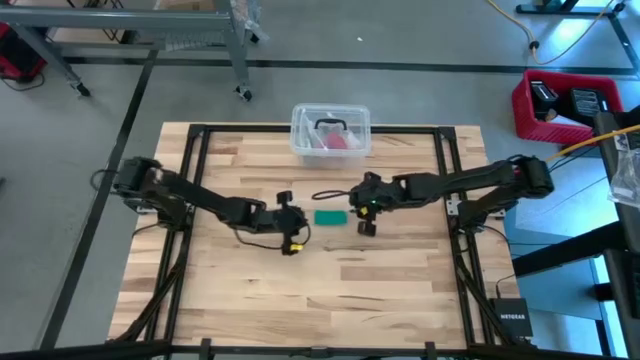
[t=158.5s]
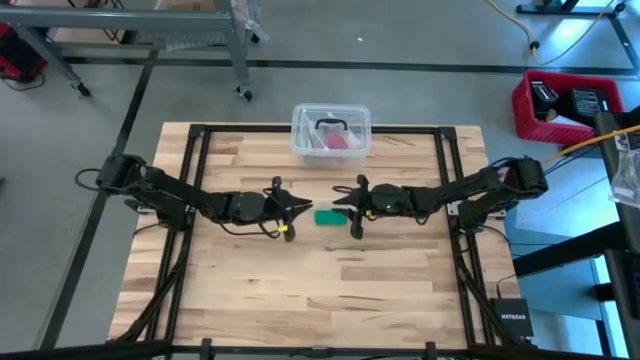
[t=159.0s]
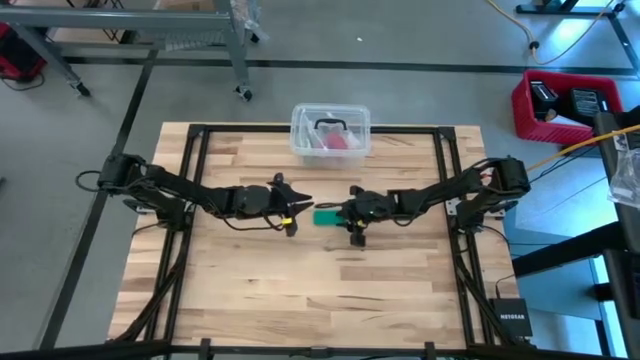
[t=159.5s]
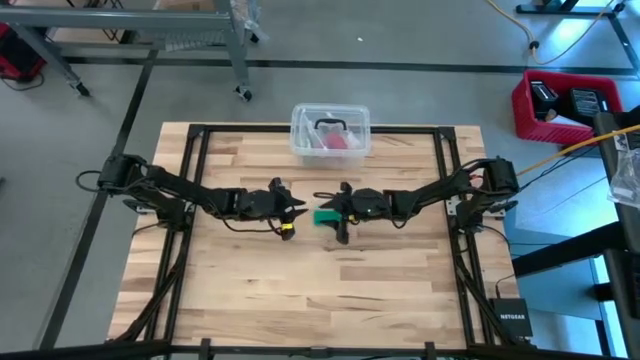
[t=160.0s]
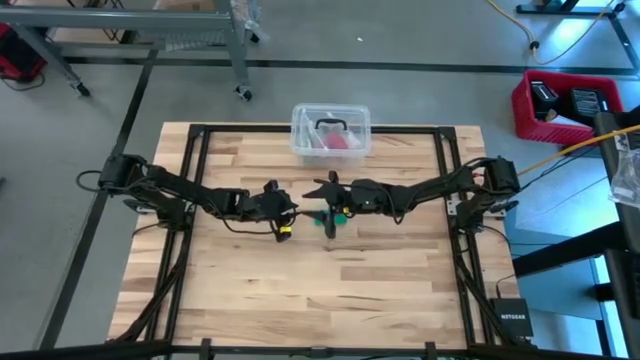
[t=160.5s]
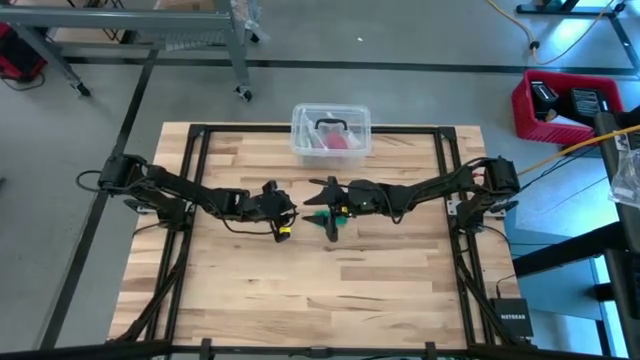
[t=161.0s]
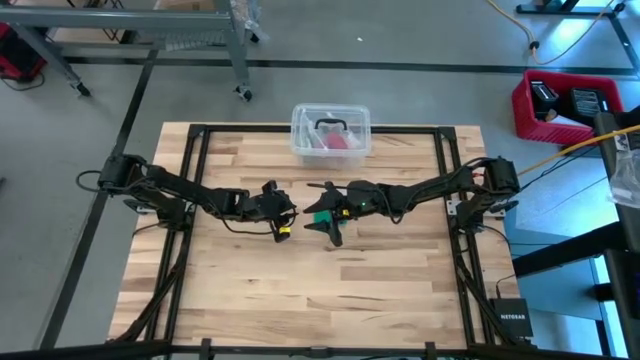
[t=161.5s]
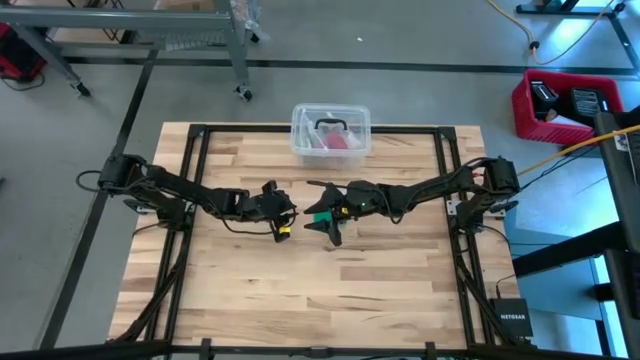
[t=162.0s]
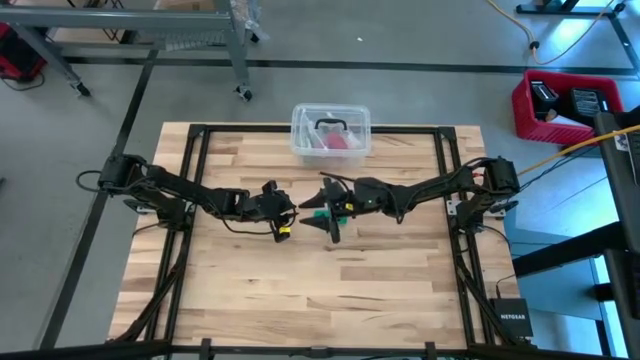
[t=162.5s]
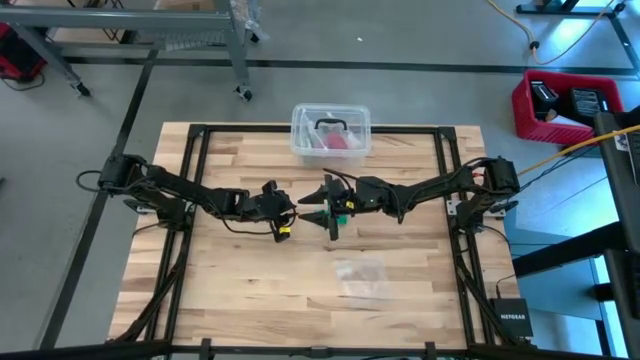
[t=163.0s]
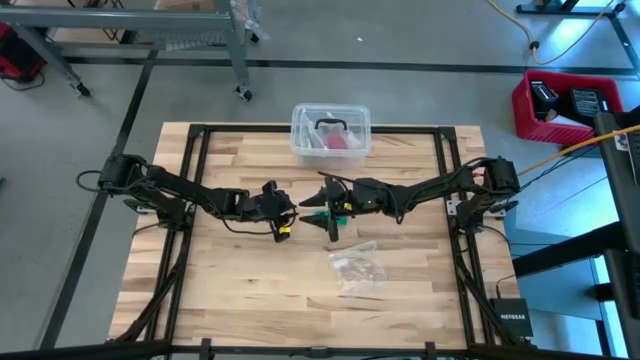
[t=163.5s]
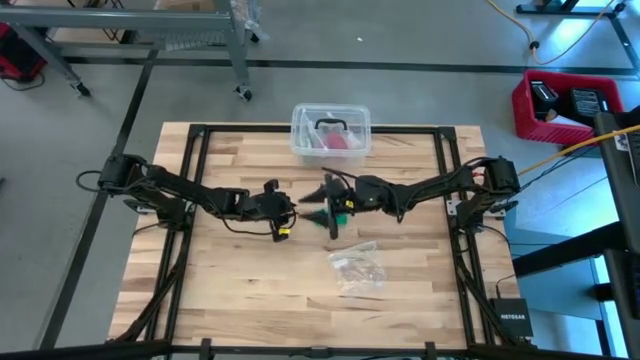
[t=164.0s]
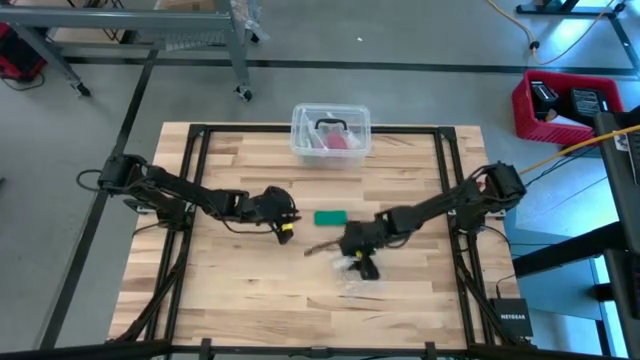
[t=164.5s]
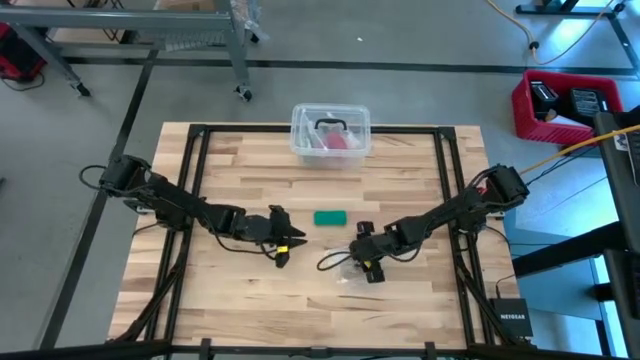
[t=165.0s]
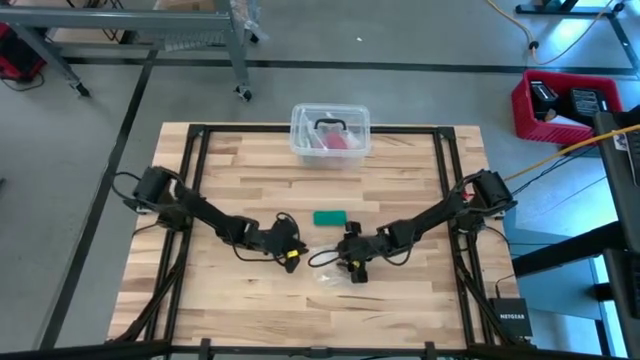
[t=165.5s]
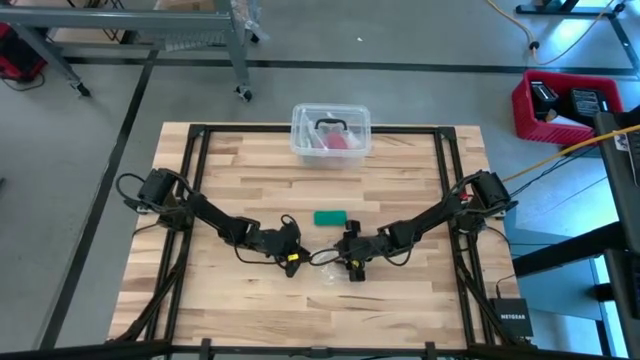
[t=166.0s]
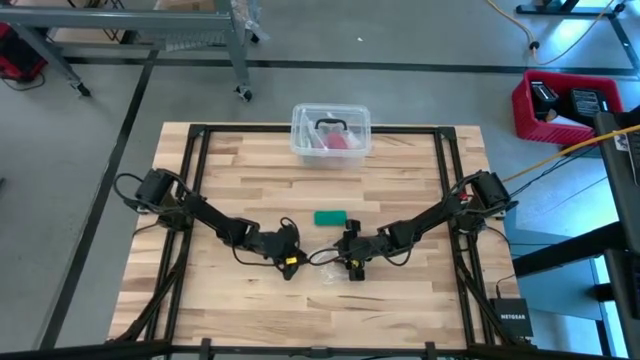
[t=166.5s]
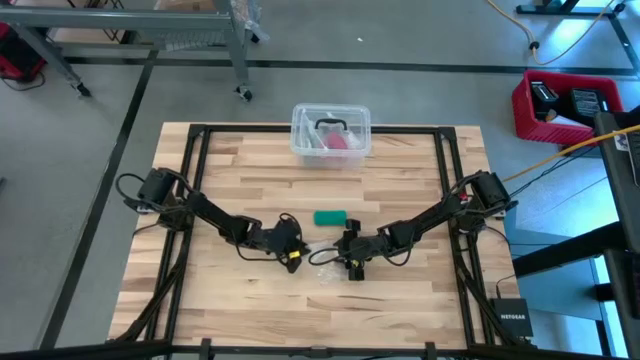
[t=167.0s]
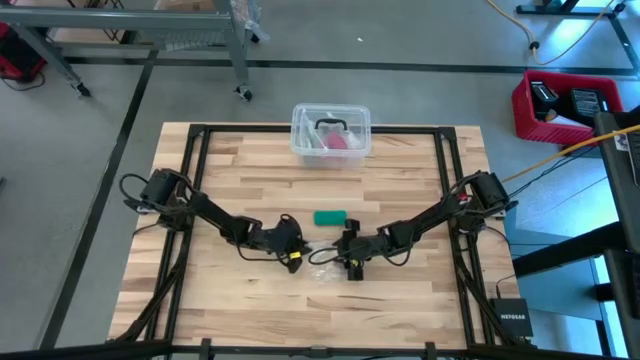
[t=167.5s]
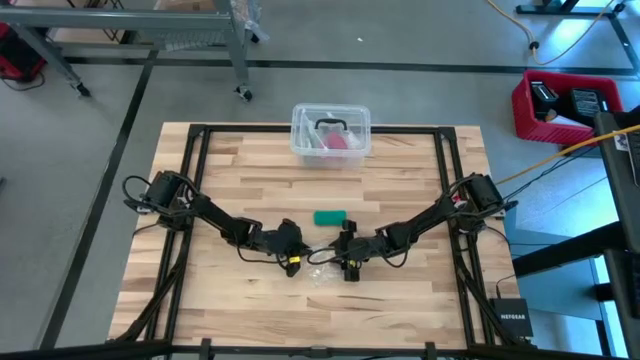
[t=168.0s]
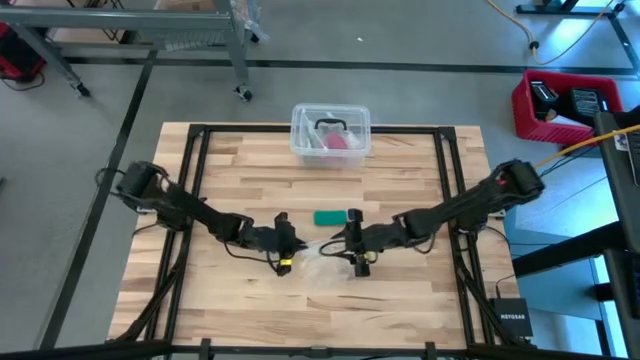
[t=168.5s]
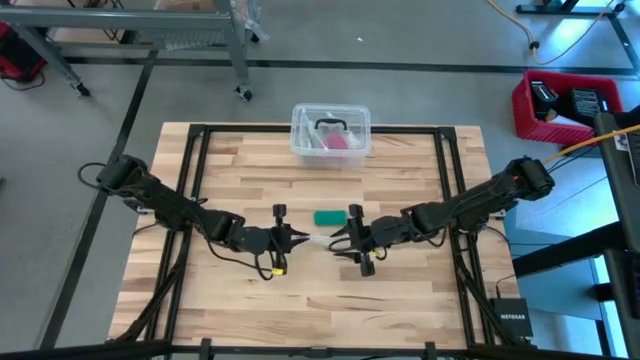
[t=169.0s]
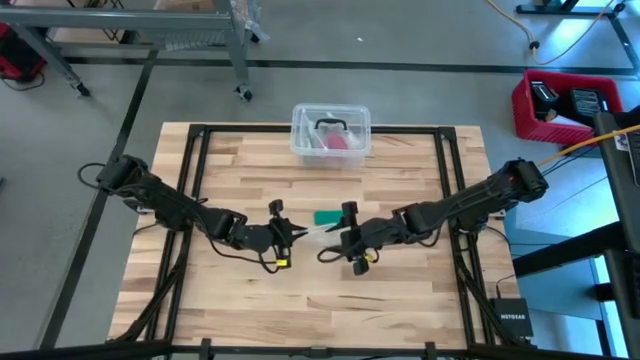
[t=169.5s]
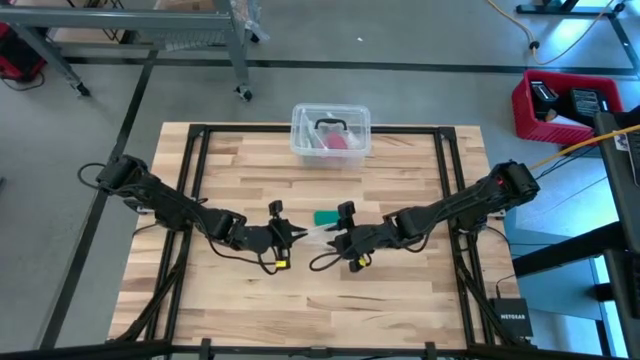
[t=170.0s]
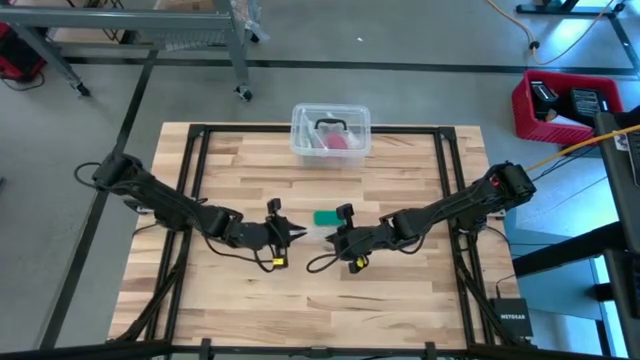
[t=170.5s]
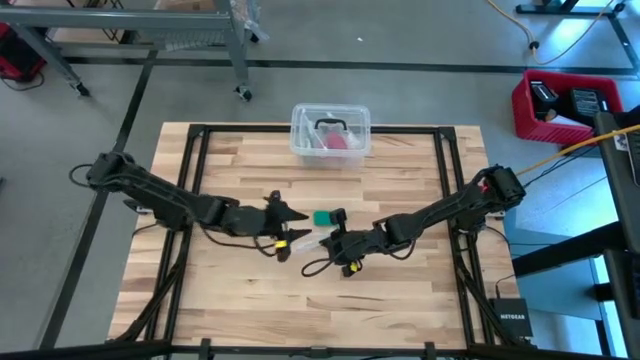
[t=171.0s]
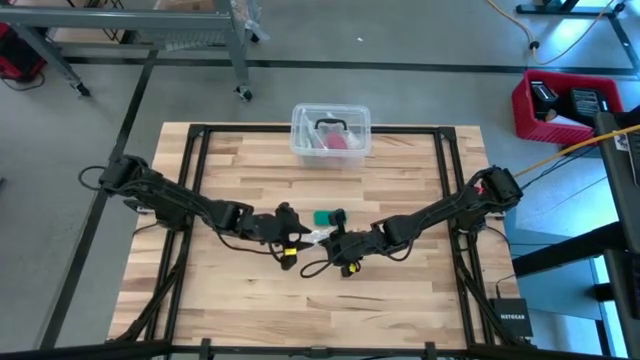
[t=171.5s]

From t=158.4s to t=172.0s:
Task: Roll bandage
Put the rolled bandage into the transparent zip bag

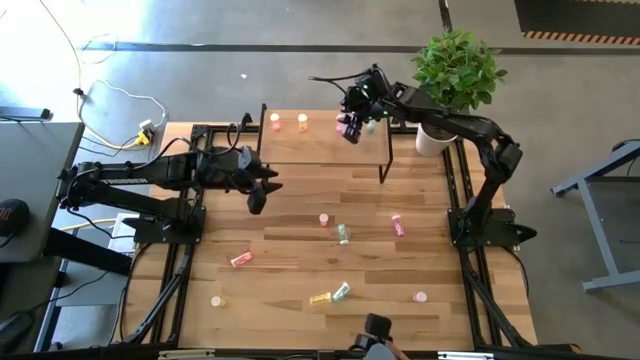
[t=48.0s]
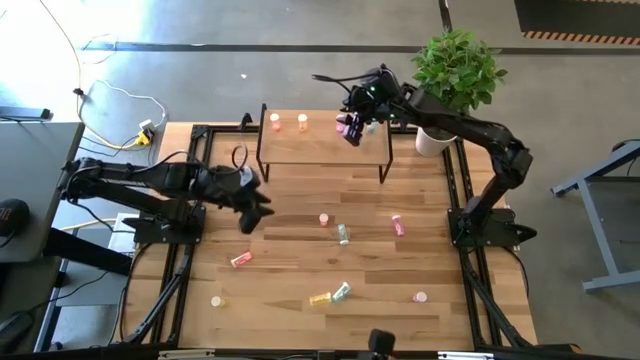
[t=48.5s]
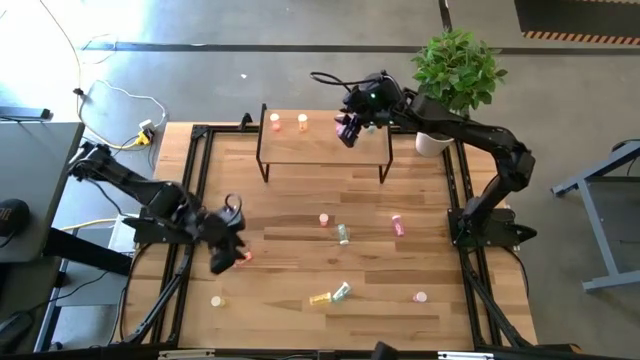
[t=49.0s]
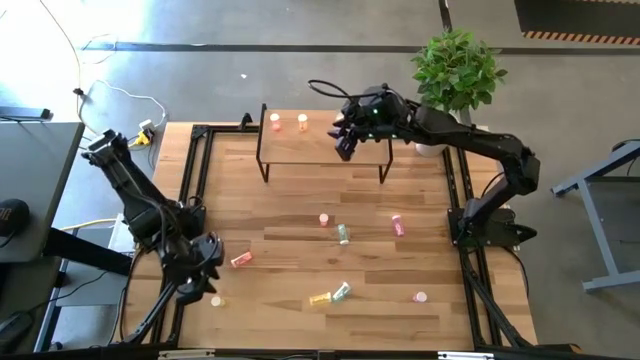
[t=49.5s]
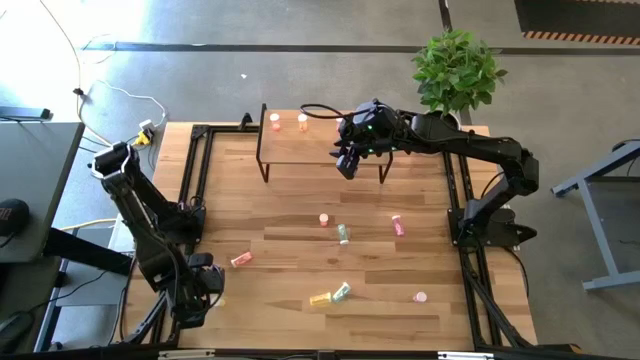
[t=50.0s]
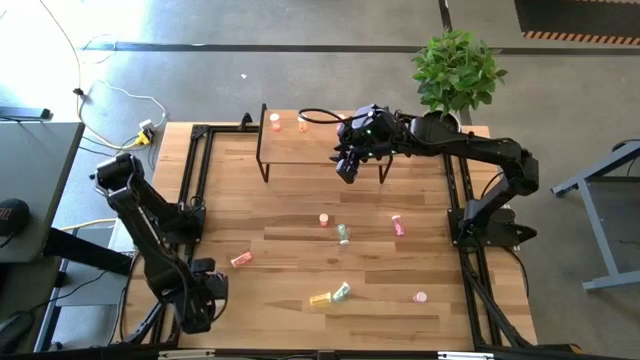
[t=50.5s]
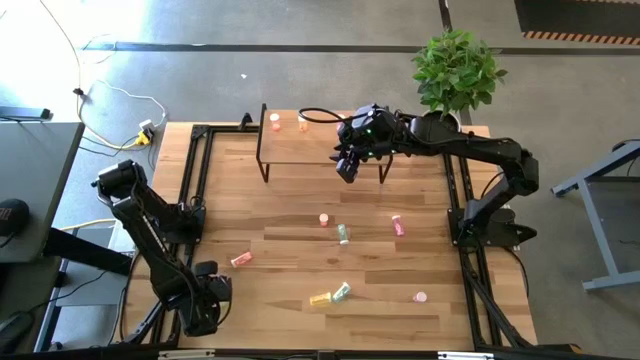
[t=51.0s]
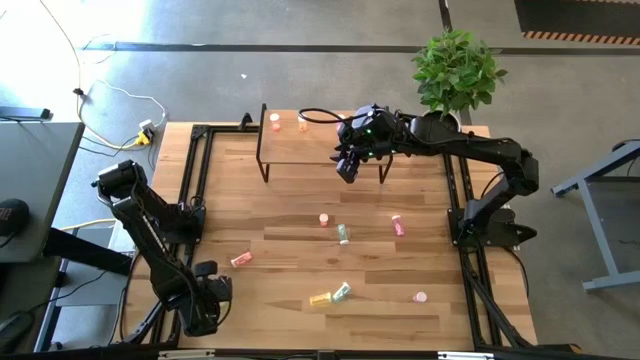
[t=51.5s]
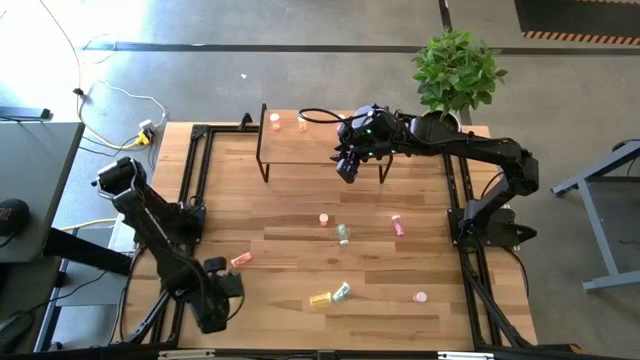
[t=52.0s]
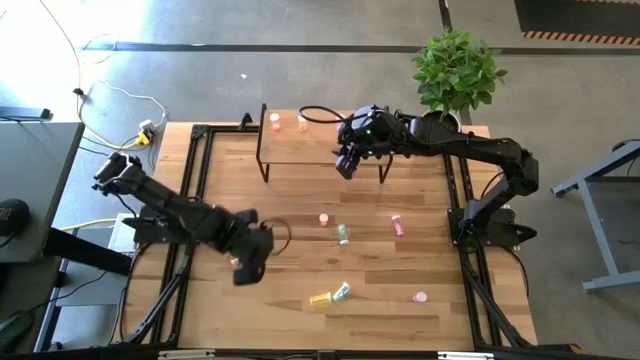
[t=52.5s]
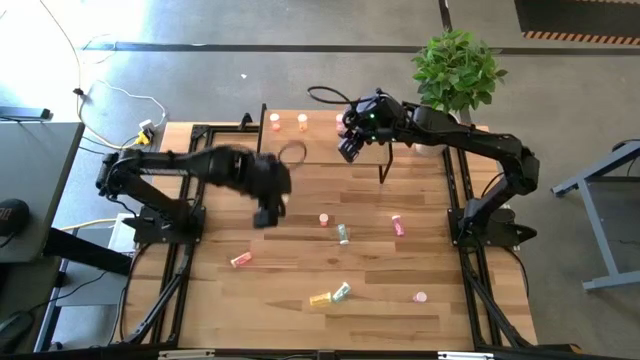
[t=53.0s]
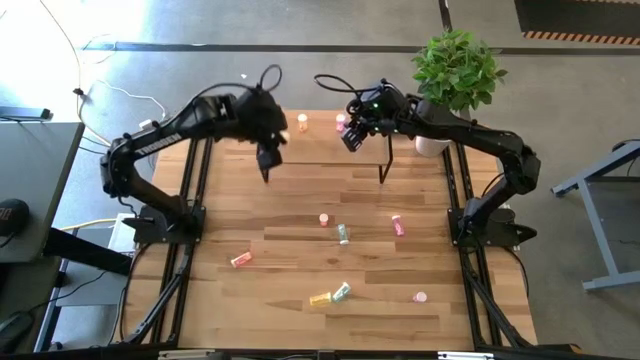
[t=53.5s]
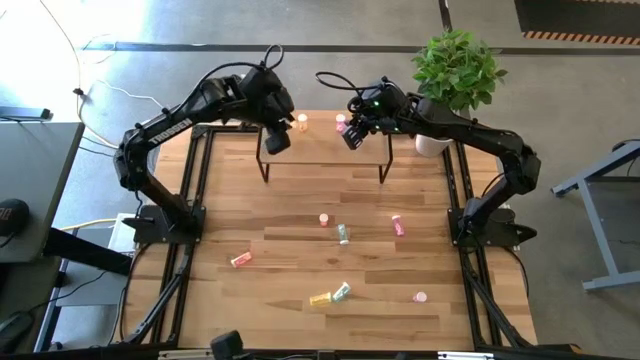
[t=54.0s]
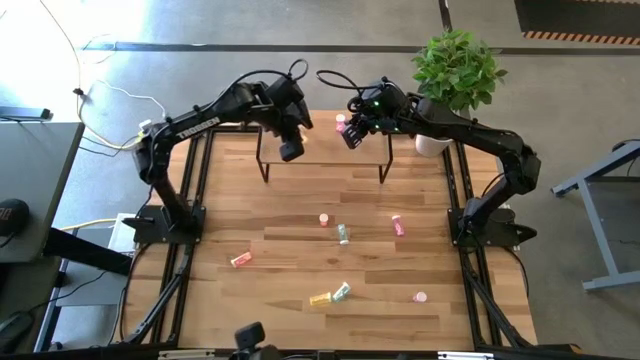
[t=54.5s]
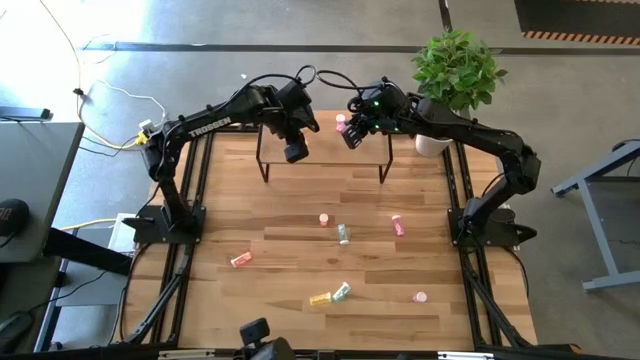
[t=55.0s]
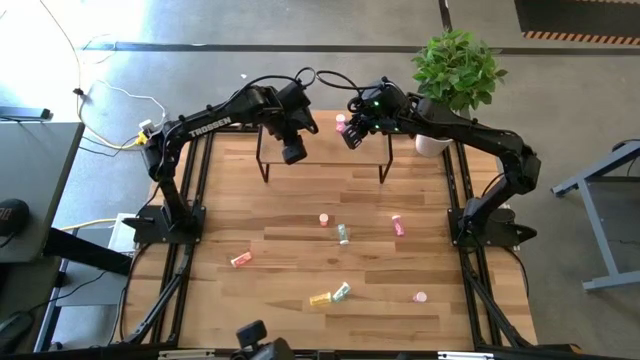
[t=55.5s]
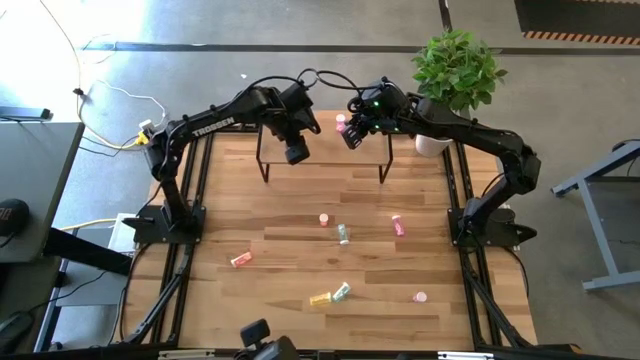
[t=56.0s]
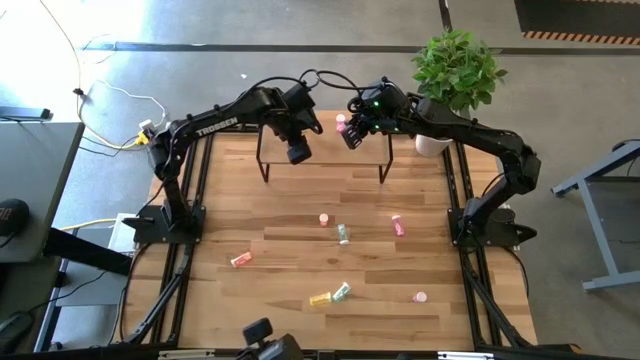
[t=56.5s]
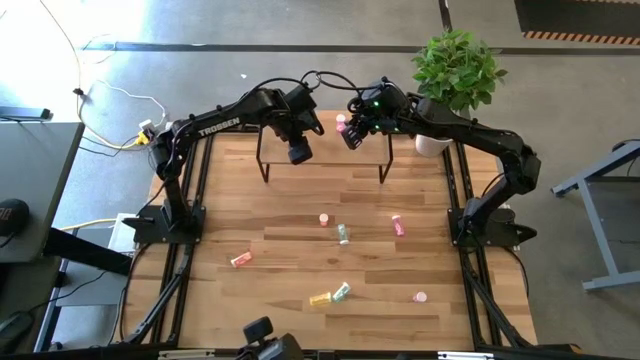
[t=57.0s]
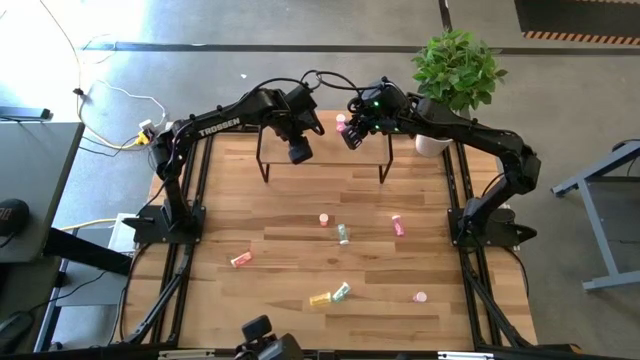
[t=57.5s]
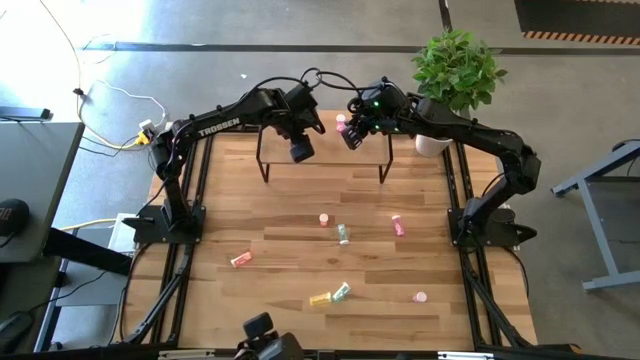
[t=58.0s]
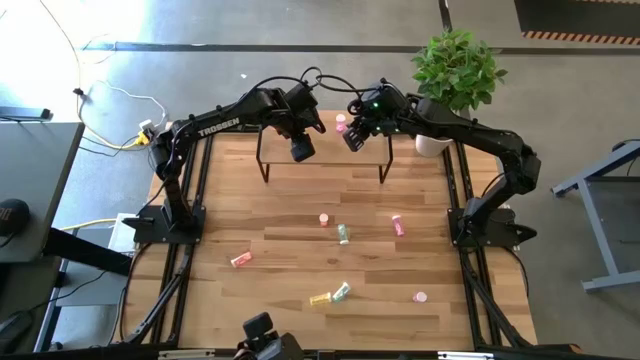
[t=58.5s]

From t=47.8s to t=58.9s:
Task: Pick and place medicine bottles onto shelf by color
Put the left yellow pill bottle on the shelf aligned with the other yellow pill bottle
